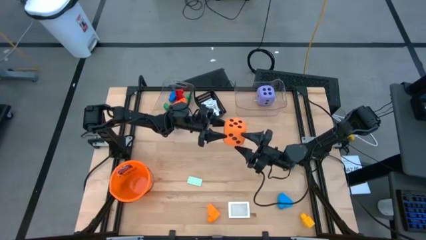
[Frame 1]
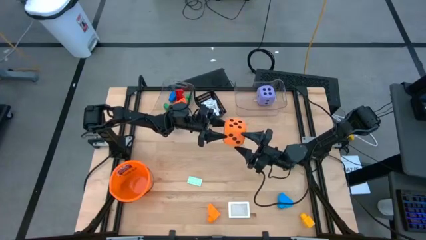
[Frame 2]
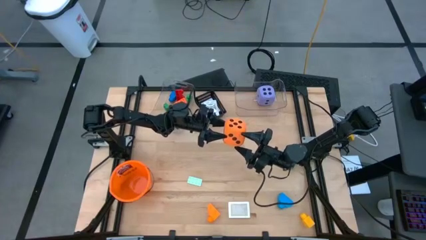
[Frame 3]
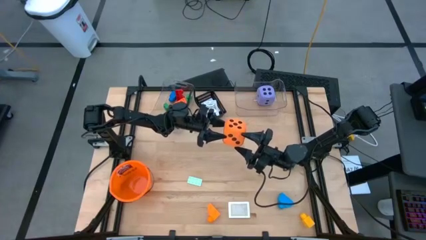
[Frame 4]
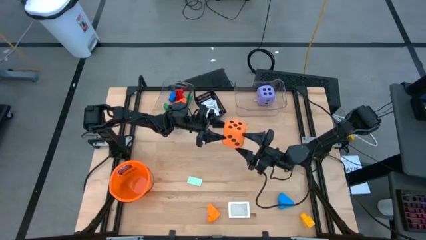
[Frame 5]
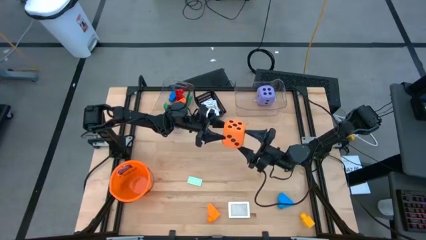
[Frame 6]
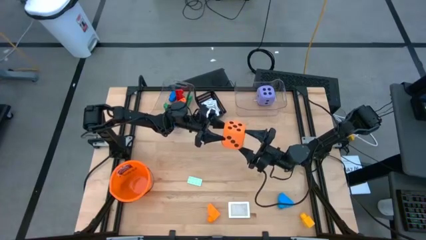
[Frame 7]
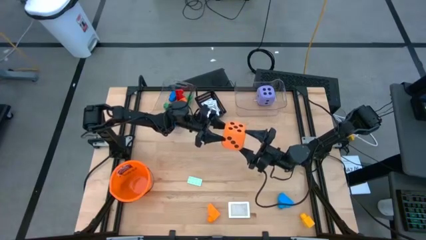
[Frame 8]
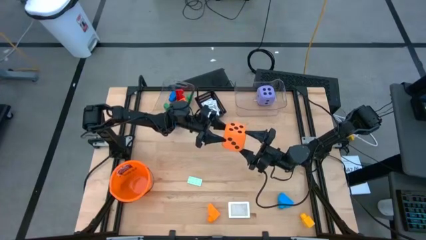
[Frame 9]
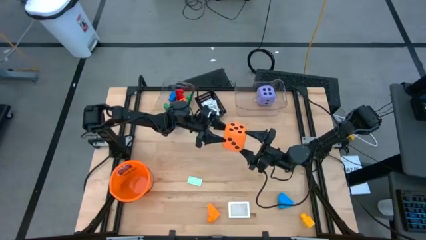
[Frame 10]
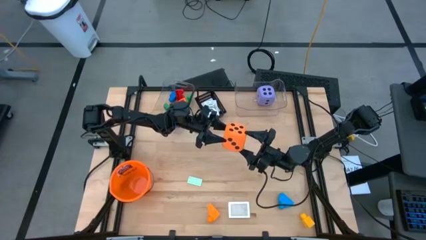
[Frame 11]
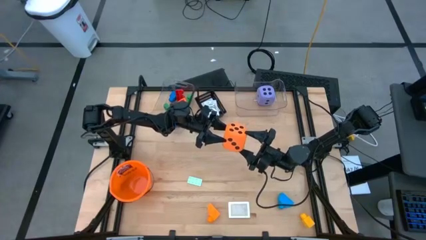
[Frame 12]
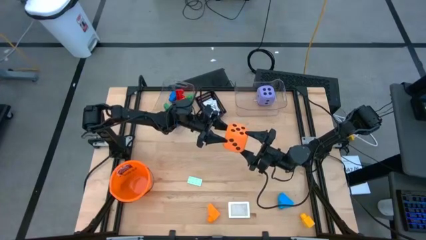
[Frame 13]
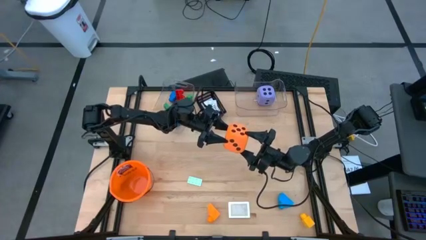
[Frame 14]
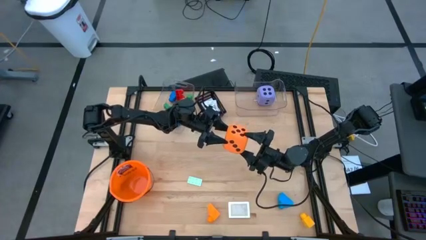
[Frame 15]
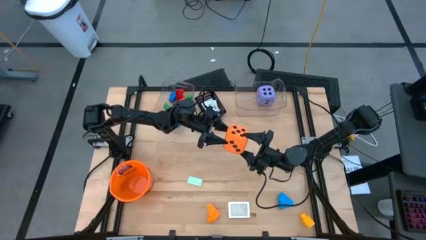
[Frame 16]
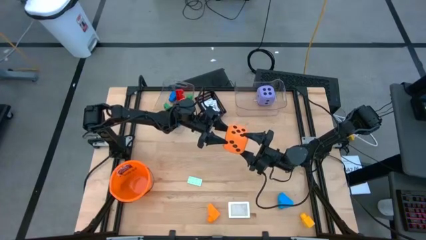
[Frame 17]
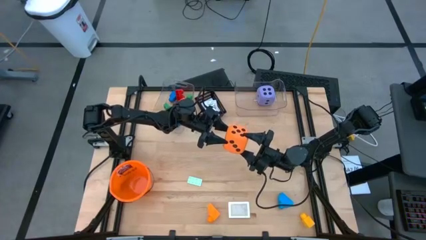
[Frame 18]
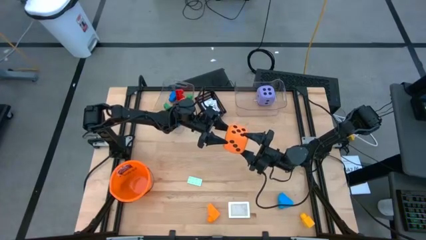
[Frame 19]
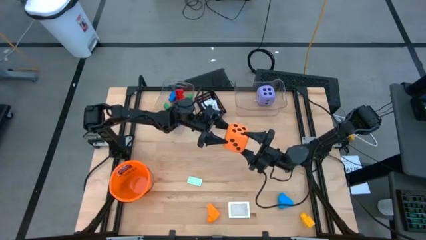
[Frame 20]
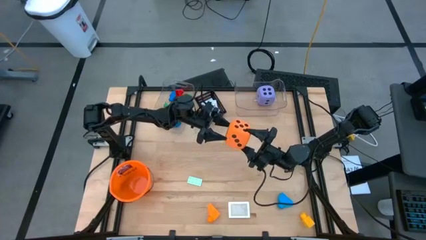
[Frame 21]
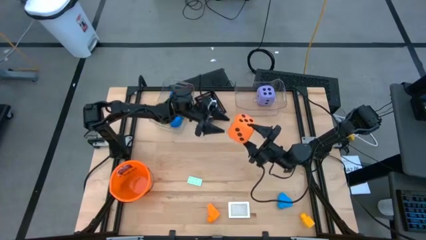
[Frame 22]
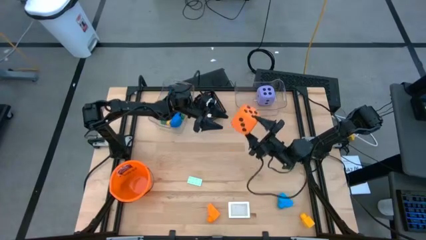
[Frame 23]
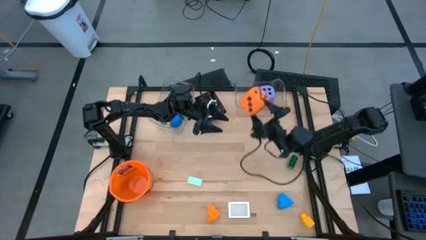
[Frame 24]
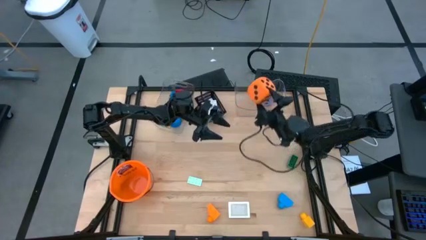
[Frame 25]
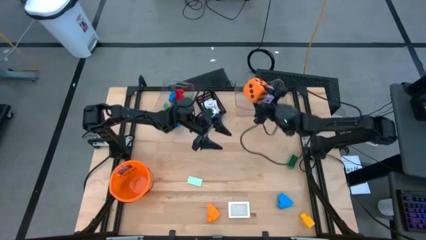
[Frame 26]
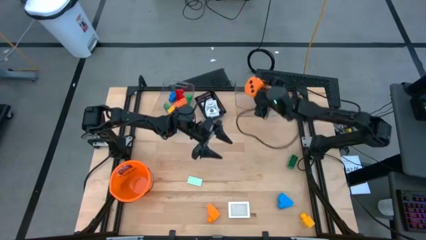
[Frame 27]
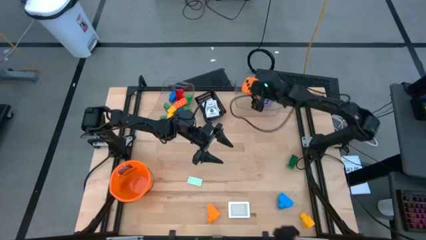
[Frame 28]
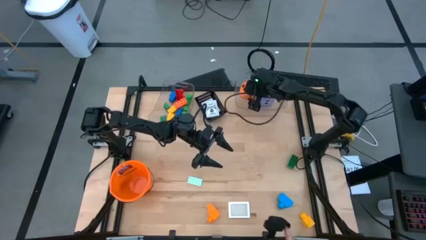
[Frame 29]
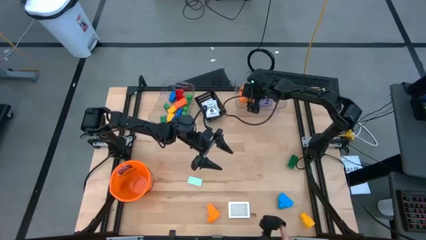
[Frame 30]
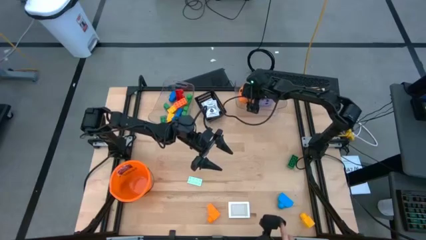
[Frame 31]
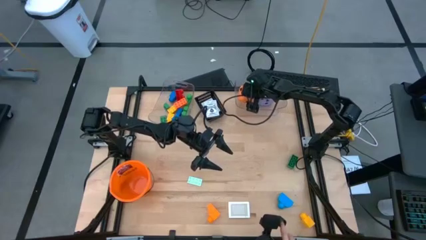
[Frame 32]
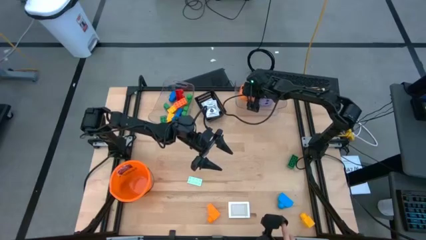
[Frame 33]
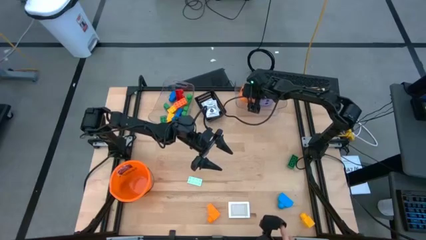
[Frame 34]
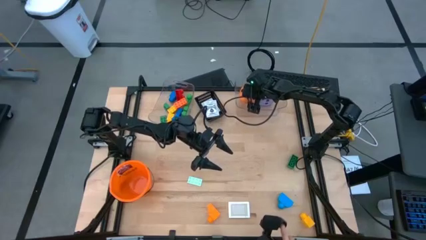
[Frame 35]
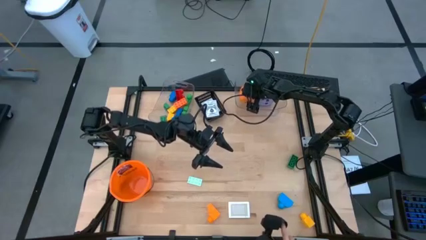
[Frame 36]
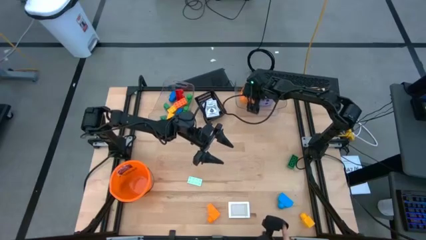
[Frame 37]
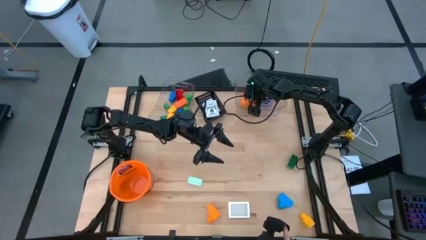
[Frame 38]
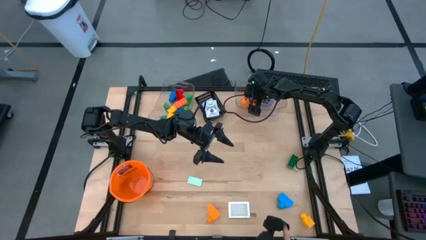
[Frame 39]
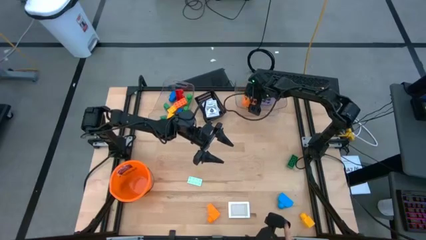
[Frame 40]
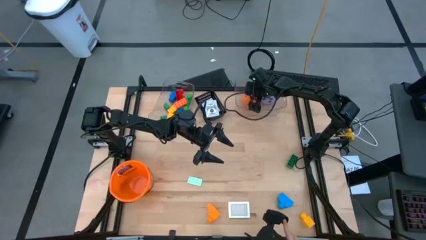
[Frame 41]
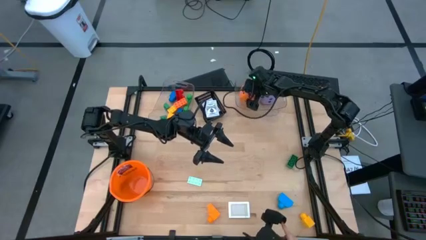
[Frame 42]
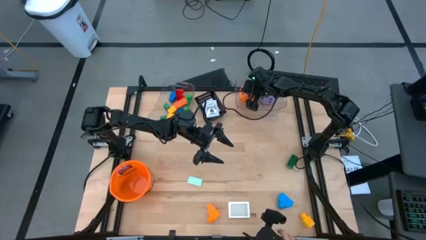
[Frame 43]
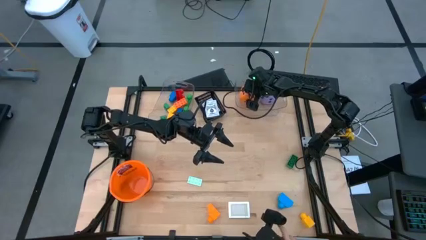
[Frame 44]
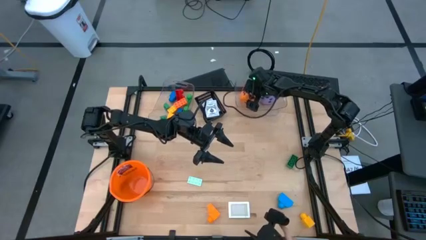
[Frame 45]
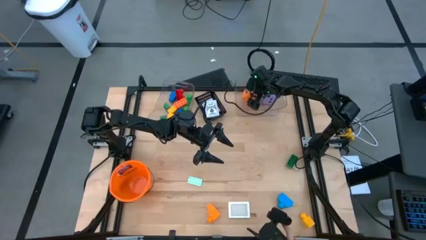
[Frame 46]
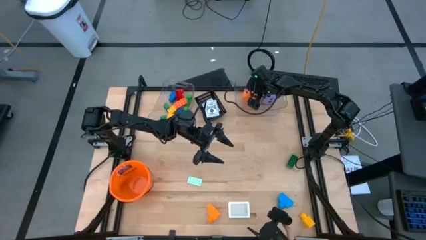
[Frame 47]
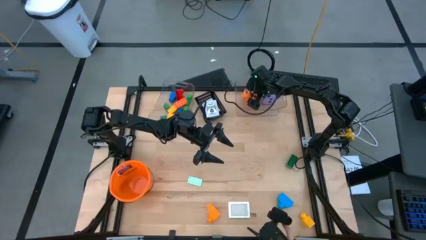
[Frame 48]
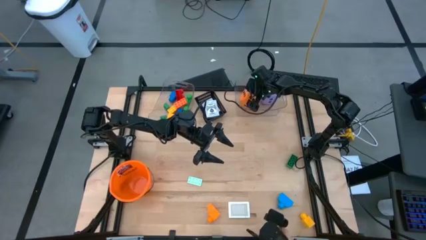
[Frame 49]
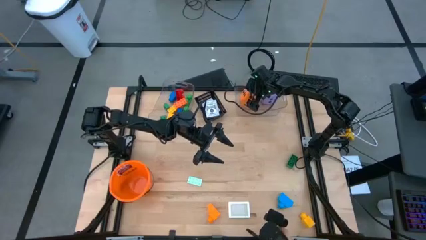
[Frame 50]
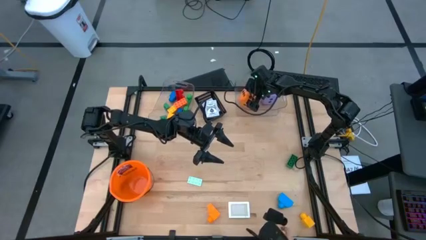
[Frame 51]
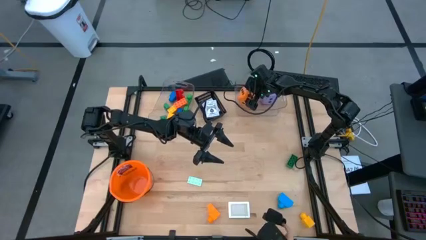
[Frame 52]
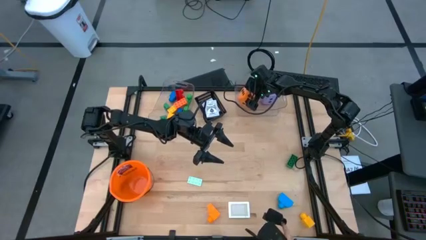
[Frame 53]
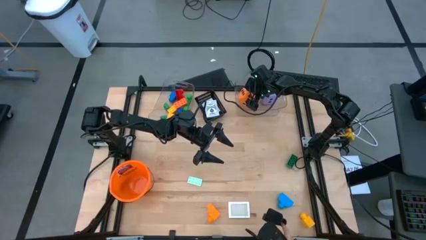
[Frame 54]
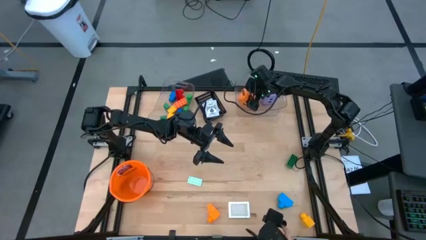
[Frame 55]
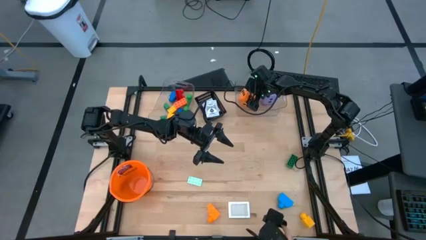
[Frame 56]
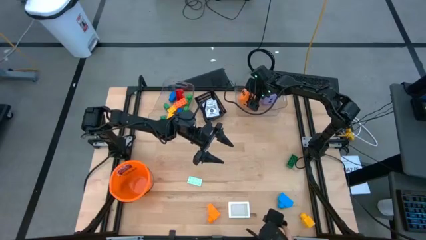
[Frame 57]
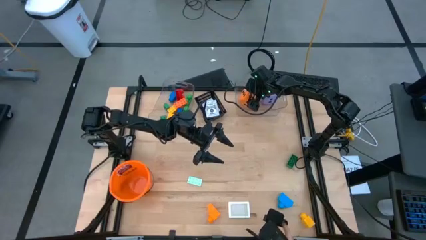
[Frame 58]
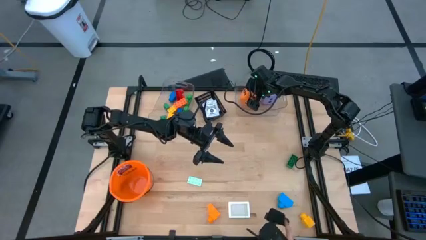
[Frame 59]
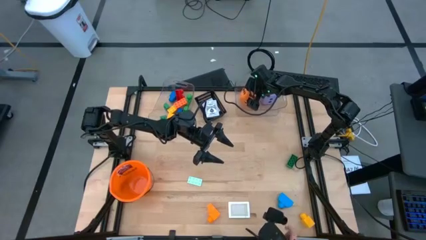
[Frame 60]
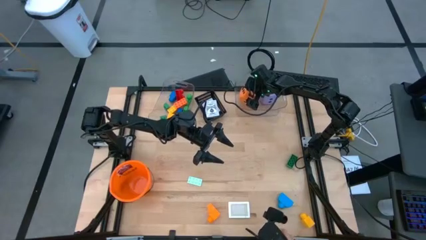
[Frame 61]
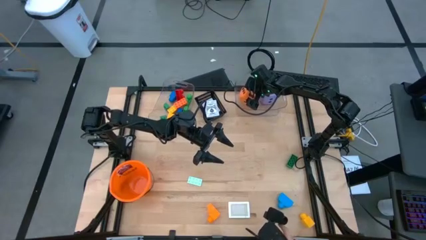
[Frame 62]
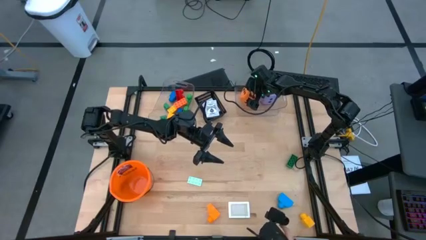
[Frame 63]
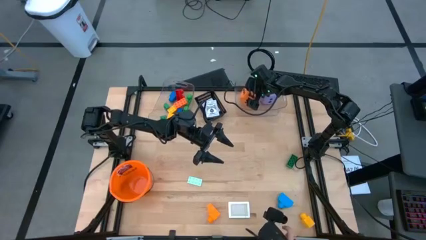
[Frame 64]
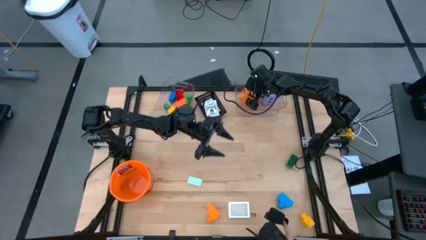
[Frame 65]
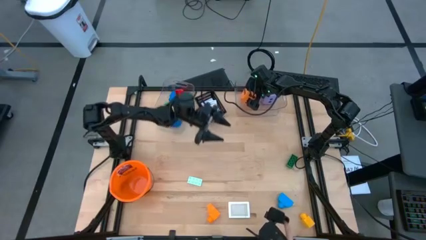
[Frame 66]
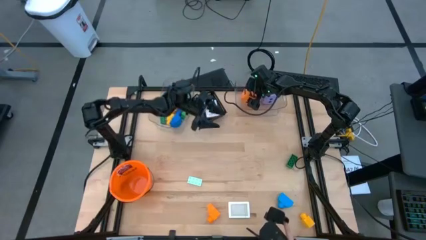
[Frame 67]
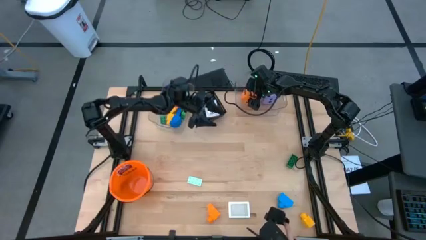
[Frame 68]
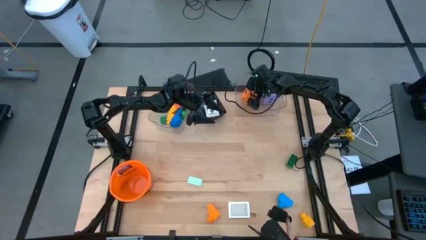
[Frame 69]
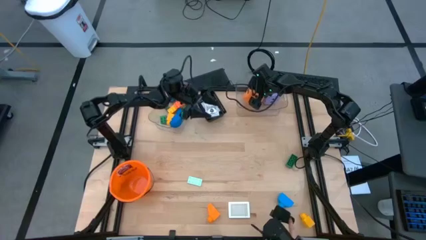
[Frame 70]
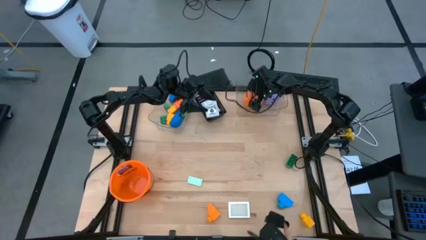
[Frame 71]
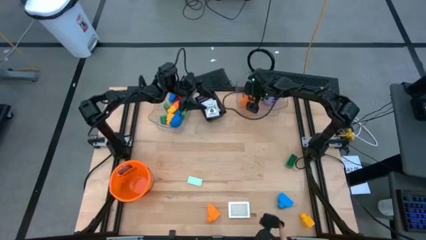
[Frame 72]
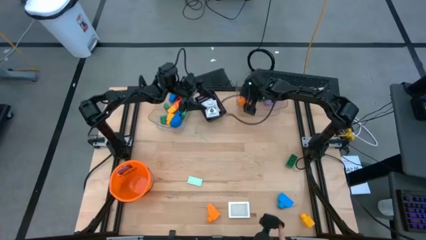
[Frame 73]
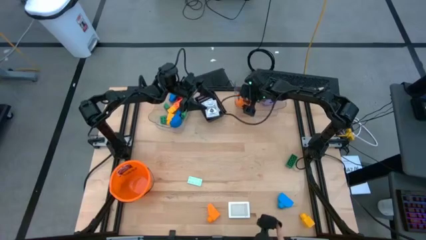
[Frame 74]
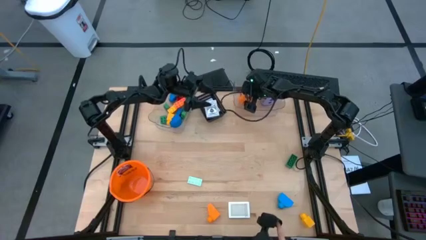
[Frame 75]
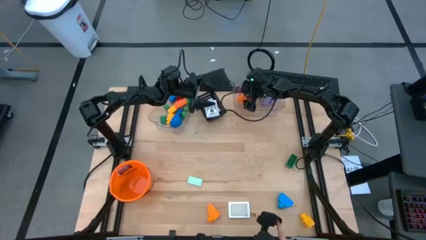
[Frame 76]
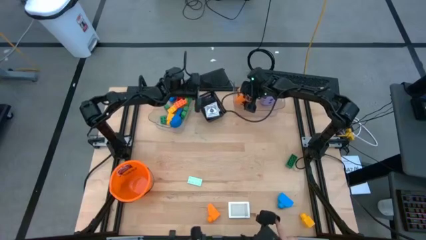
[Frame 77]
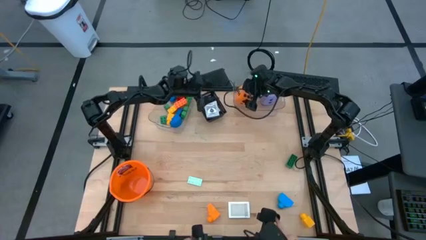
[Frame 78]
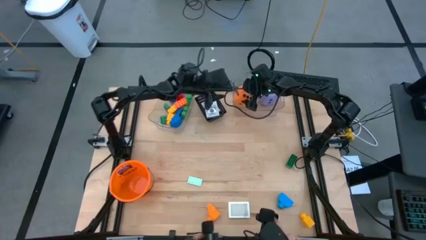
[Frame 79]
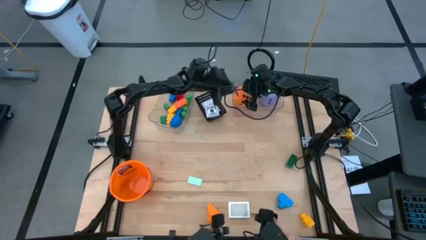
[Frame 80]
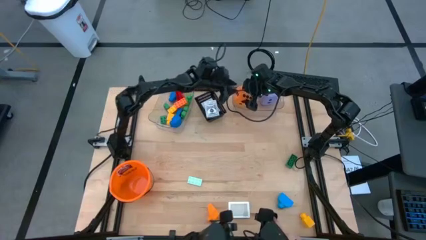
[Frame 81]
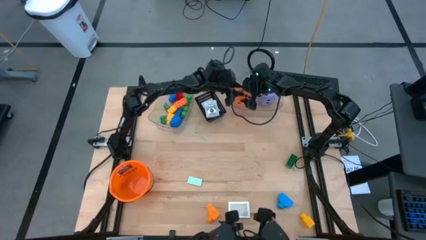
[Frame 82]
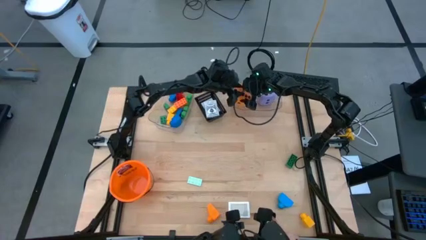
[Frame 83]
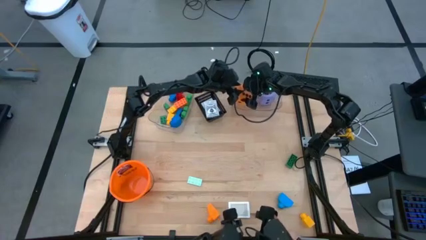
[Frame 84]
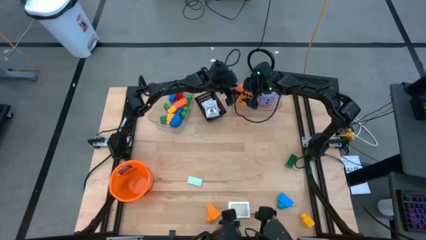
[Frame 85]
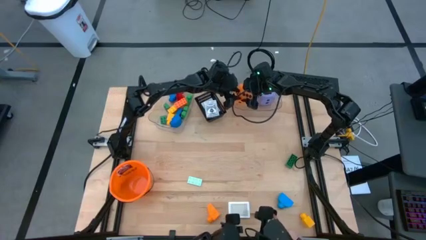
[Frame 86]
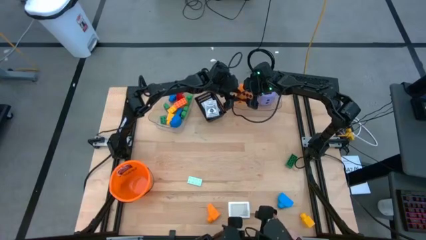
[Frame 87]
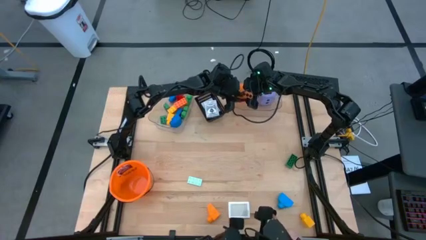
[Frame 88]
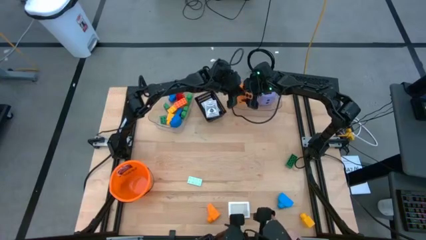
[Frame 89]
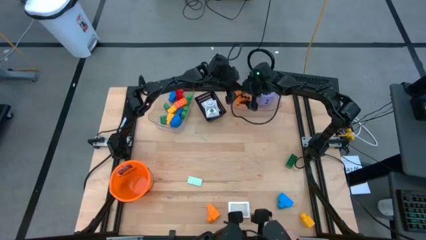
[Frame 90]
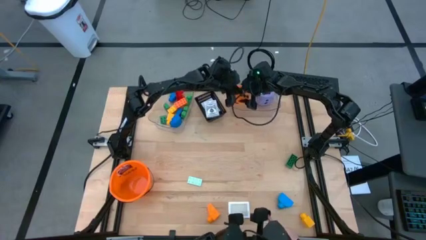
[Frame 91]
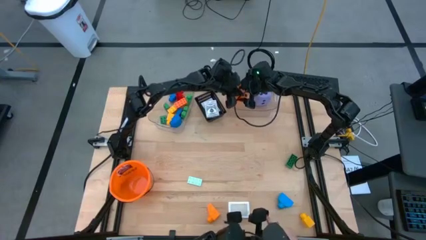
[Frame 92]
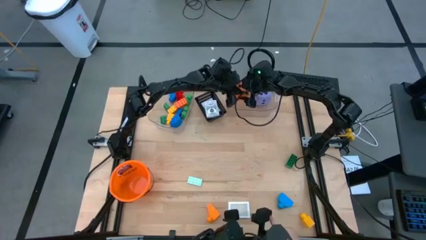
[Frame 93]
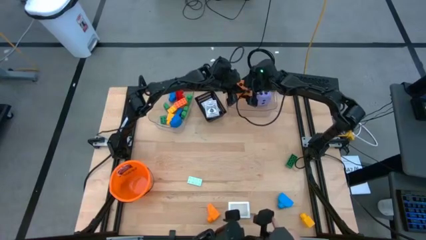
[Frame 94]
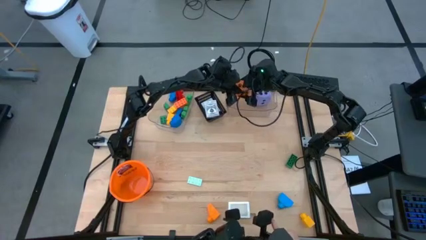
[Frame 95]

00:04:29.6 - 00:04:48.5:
Task: Pick & Place Toys
Put the orange dice into the right transparent bin
